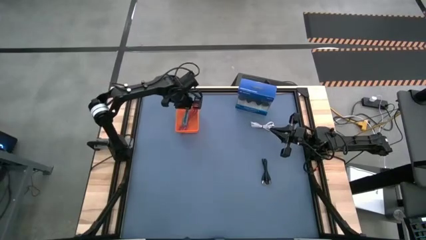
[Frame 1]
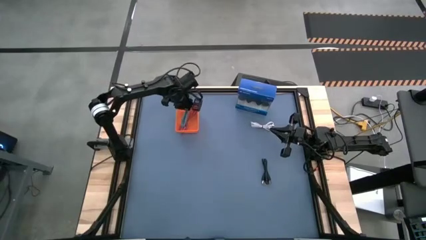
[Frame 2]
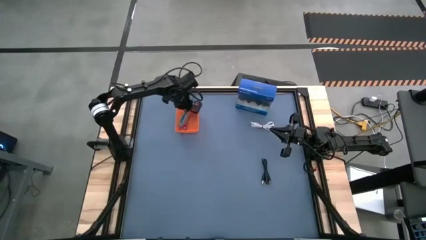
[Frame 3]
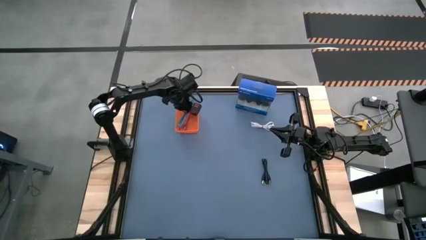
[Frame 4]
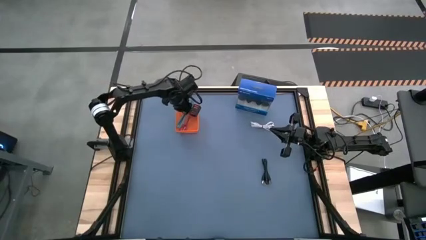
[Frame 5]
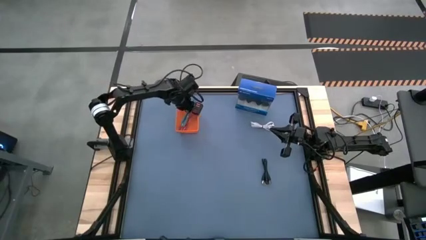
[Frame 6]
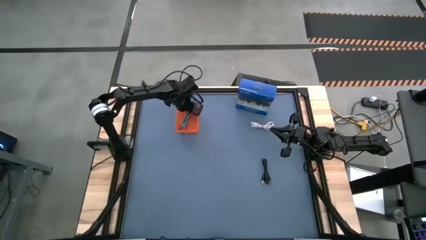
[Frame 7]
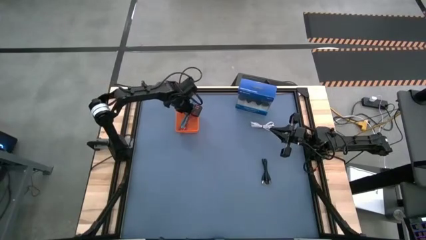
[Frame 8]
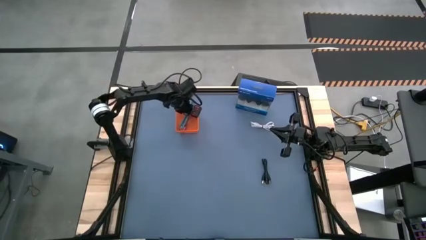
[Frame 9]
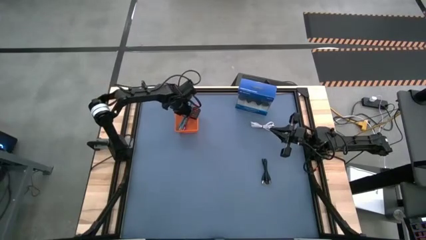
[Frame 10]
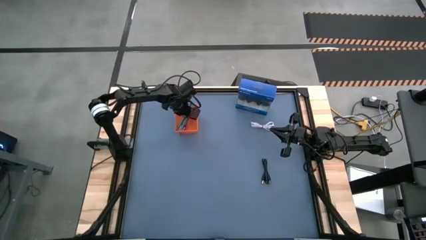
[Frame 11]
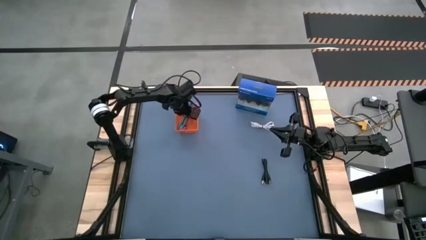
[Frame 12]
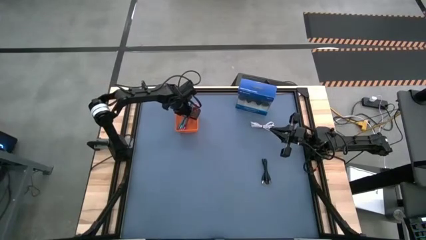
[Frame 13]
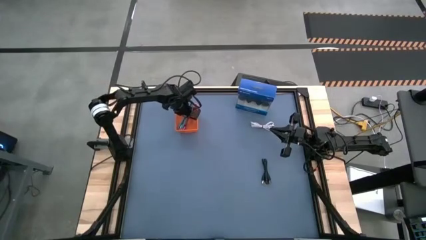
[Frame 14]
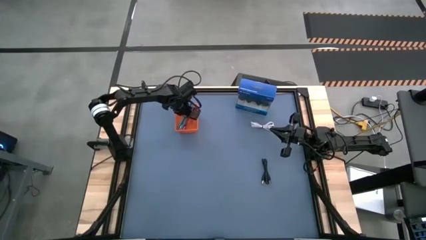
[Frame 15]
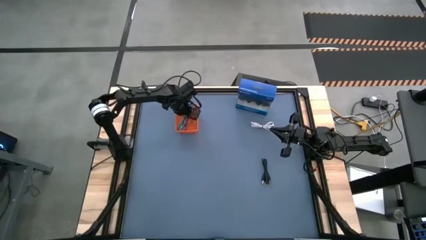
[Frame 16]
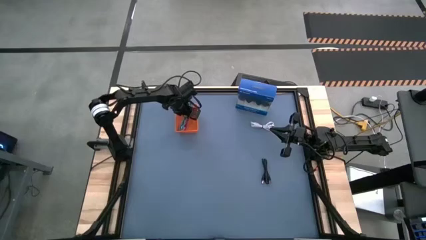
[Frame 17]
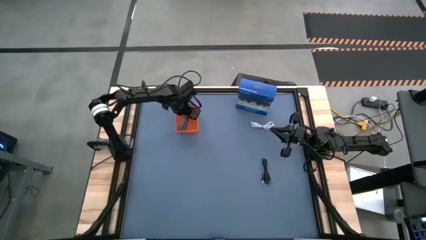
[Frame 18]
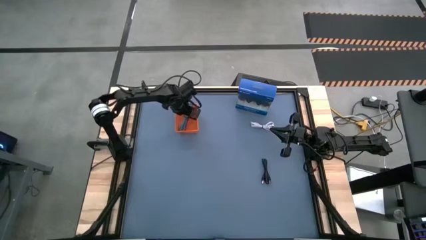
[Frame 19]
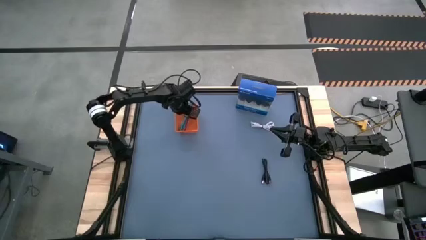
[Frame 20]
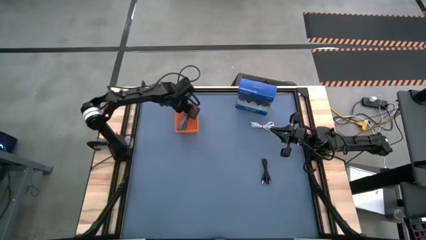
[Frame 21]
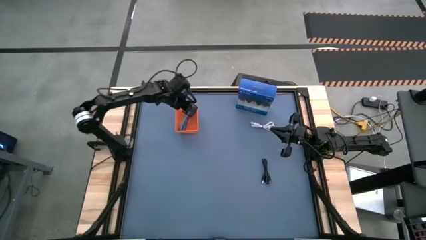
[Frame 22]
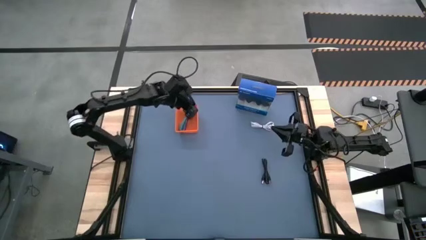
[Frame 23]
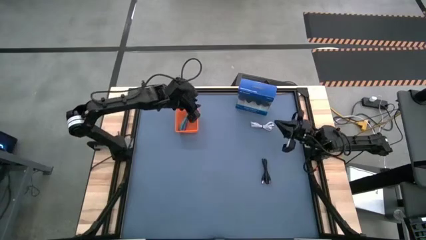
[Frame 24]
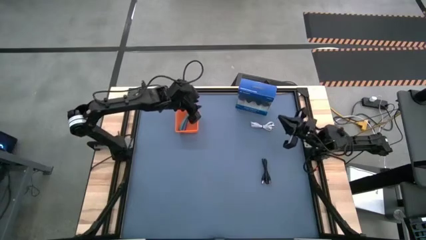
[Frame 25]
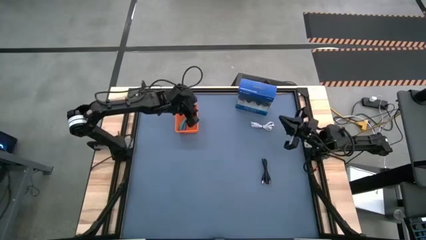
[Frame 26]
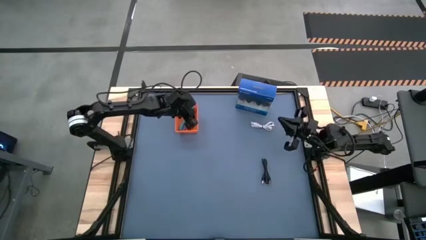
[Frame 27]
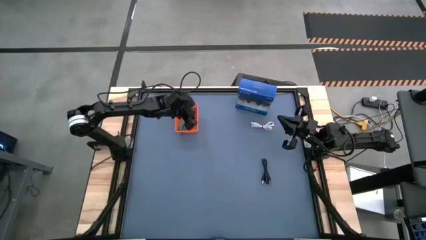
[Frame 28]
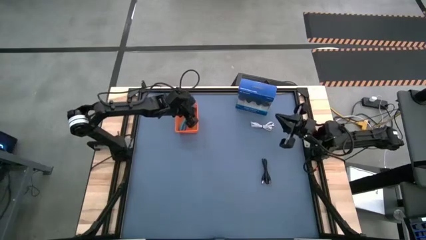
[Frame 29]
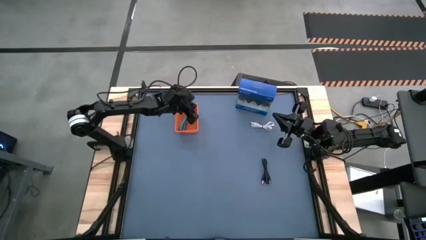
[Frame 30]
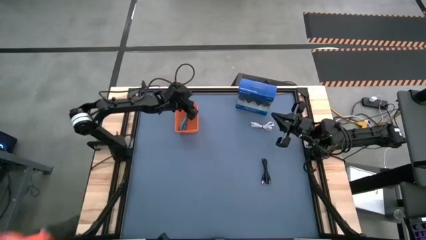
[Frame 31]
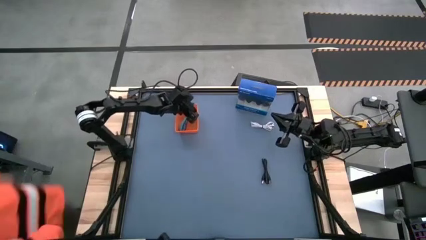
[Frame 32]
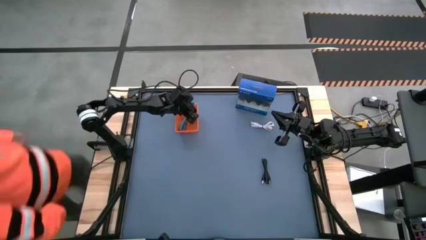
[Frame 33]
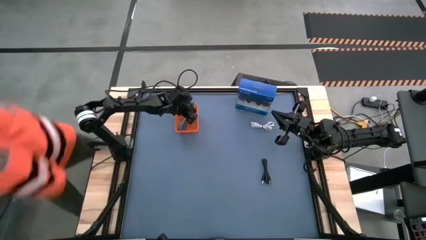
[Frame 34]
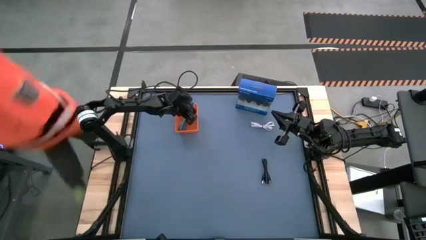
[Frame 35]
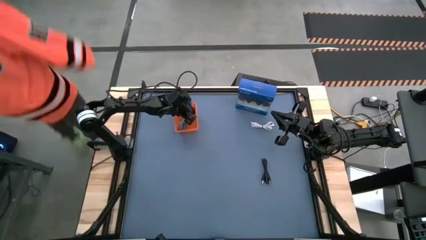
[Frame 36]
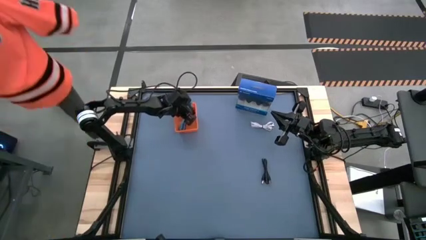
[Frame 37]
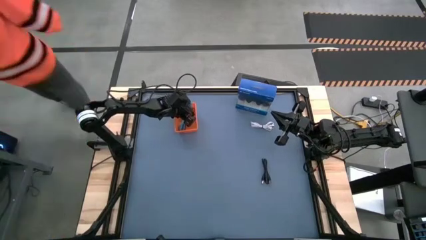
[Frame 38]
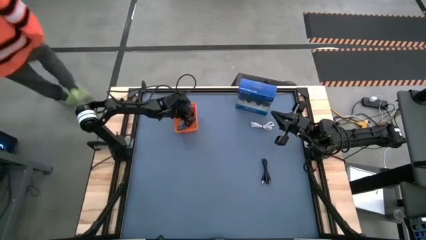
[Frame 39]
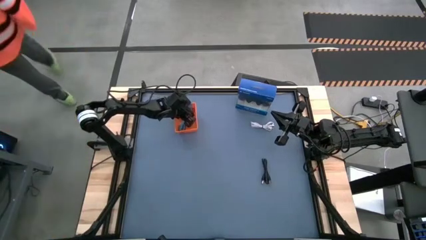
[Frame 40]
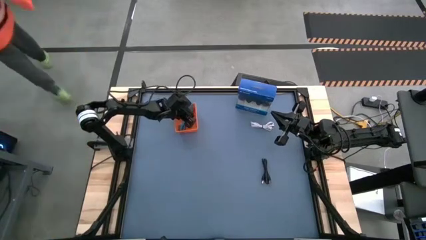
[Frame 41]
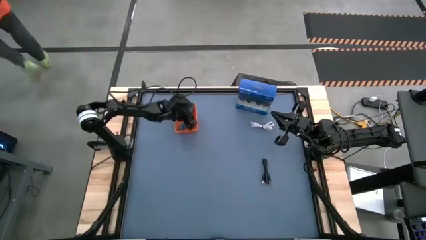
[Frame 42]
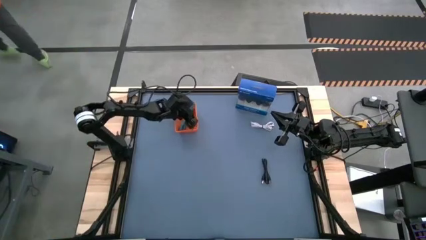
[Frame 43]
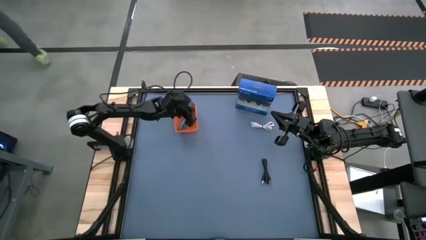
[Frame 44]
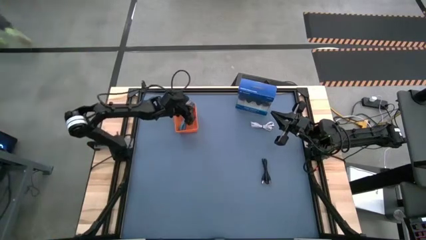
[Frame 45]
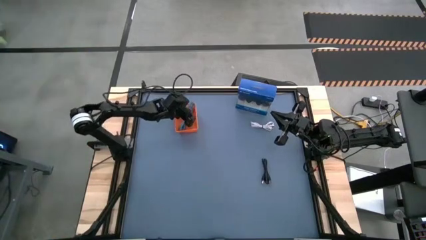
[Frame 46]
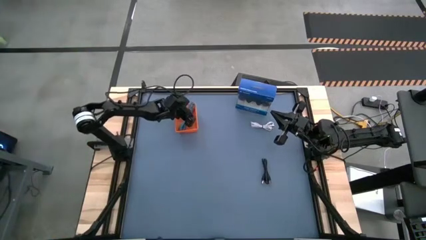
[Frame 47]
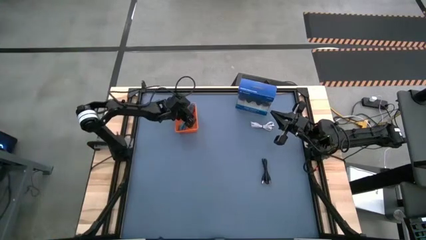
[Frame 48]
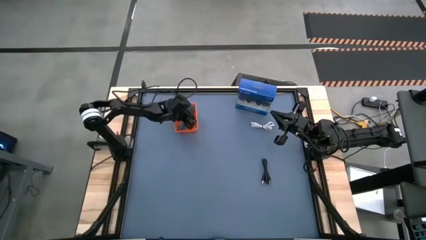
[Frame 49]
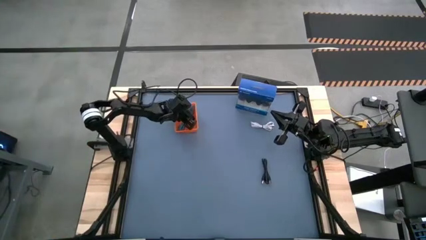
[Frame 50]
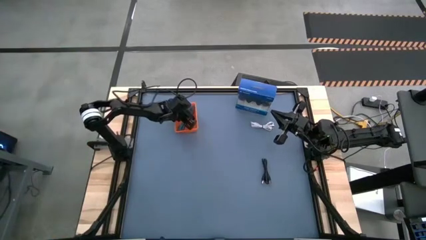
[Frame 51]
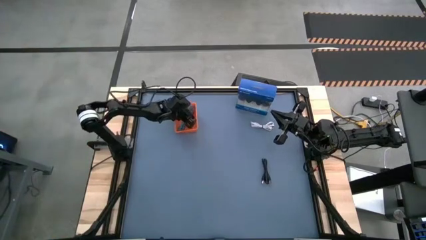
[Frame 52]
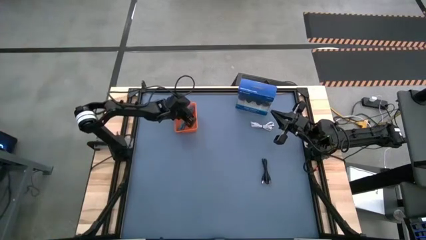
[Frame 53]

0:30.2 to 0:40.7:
Task: Pick and place USB-C Cables
Put the green charger cable into the orange bin
